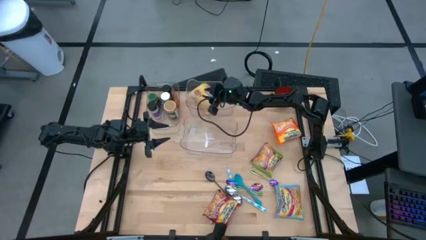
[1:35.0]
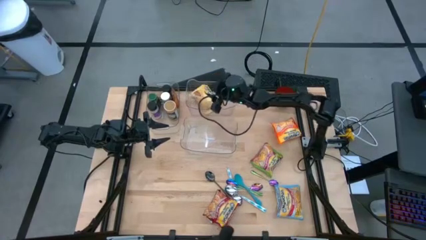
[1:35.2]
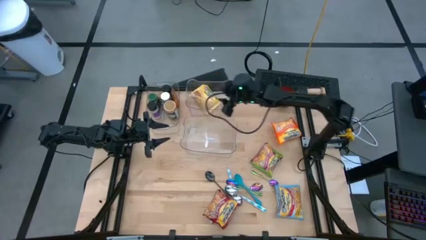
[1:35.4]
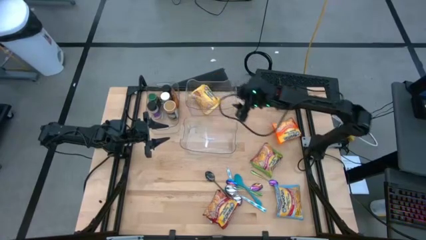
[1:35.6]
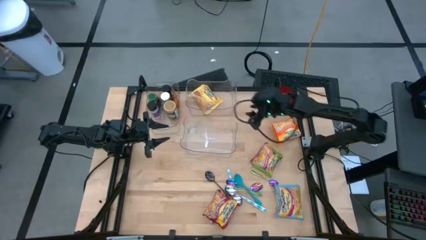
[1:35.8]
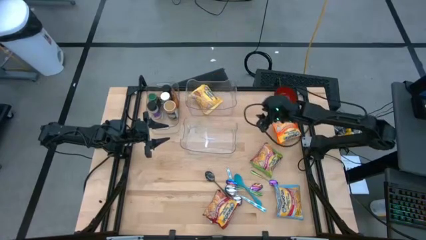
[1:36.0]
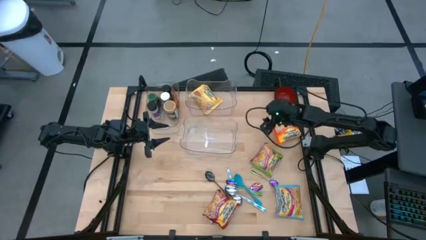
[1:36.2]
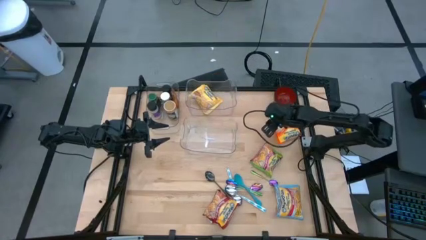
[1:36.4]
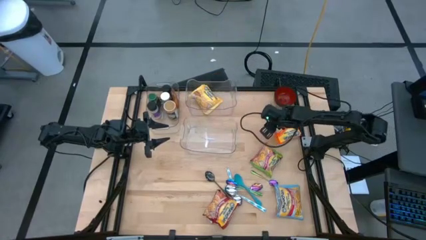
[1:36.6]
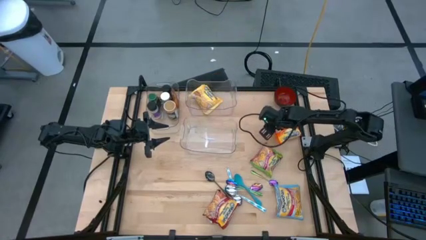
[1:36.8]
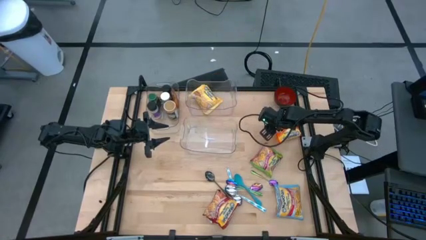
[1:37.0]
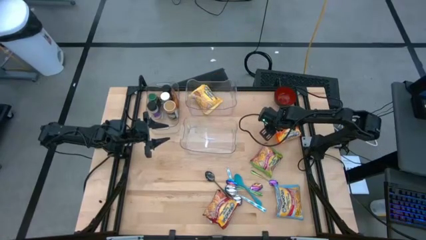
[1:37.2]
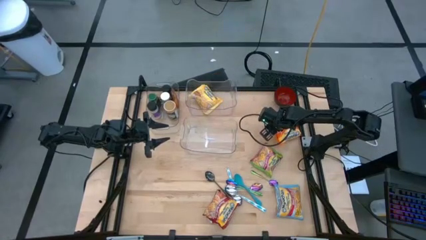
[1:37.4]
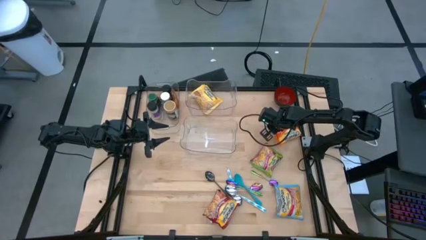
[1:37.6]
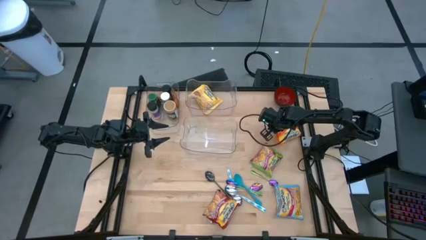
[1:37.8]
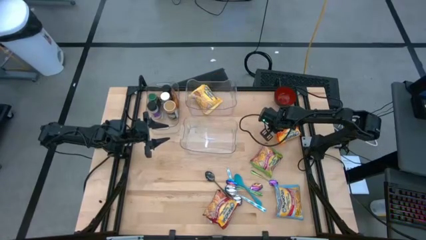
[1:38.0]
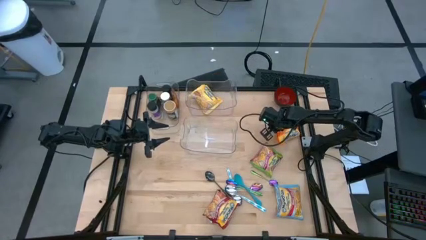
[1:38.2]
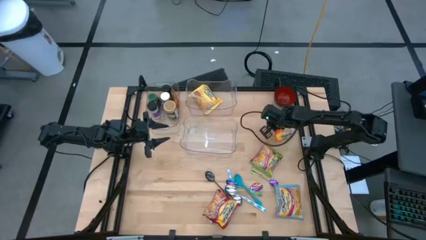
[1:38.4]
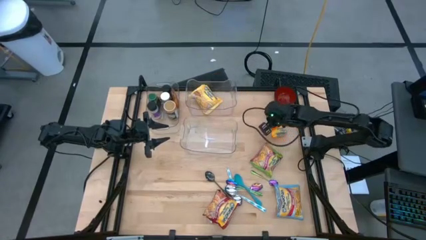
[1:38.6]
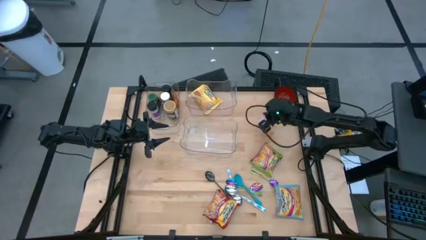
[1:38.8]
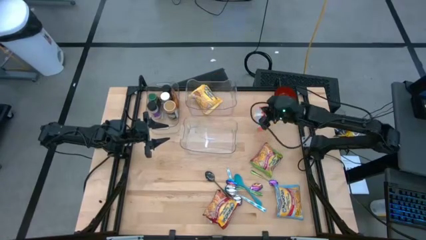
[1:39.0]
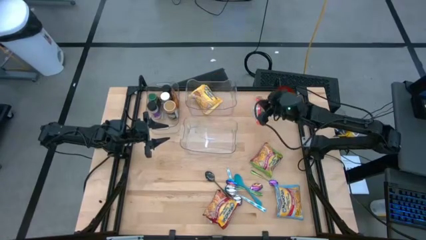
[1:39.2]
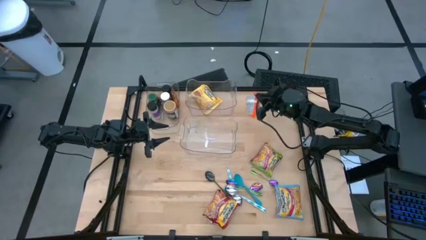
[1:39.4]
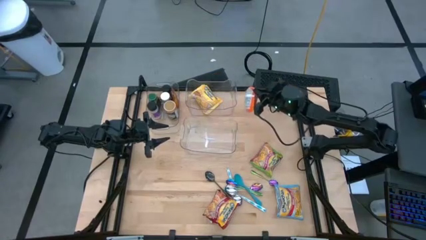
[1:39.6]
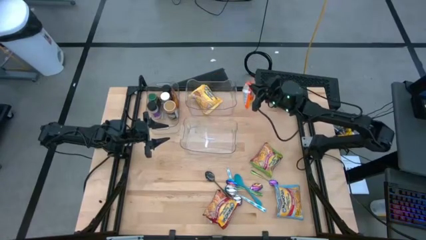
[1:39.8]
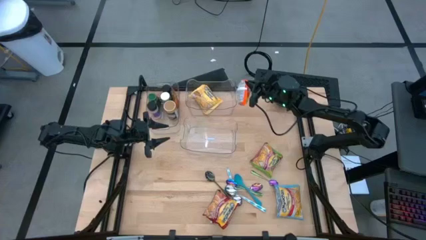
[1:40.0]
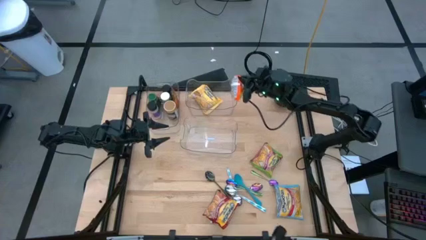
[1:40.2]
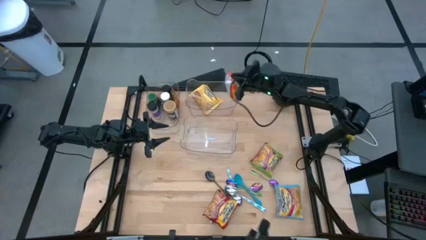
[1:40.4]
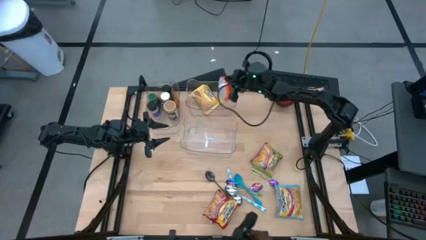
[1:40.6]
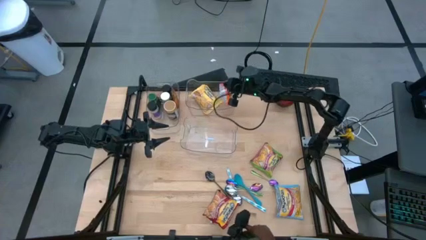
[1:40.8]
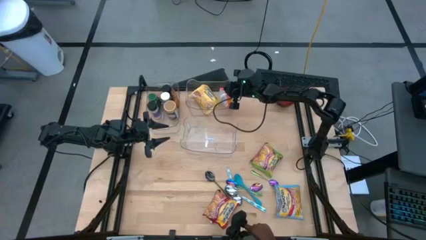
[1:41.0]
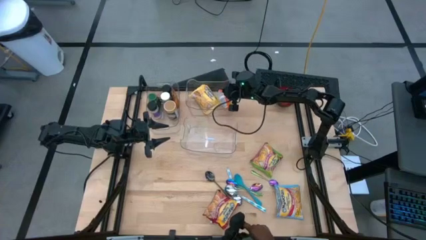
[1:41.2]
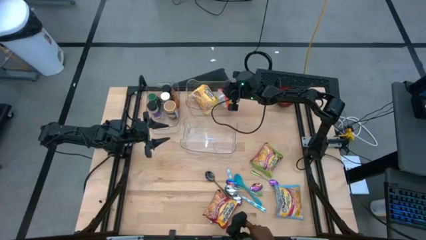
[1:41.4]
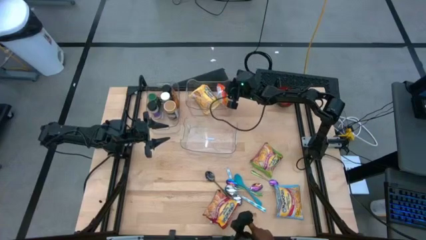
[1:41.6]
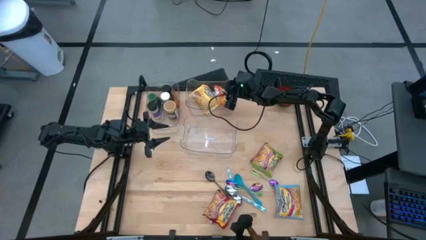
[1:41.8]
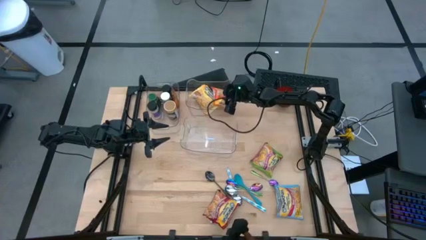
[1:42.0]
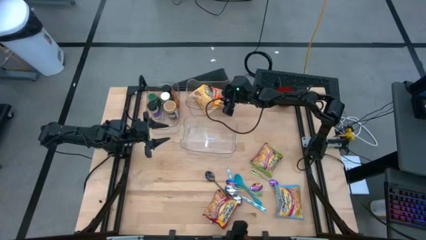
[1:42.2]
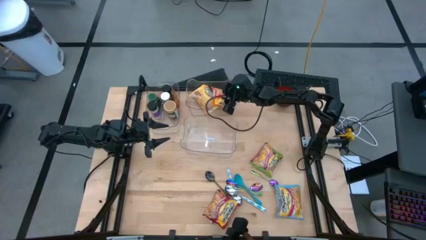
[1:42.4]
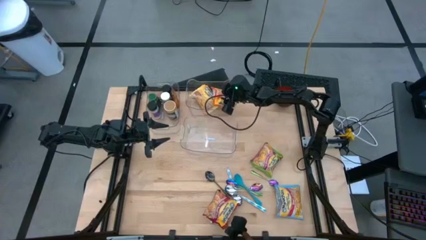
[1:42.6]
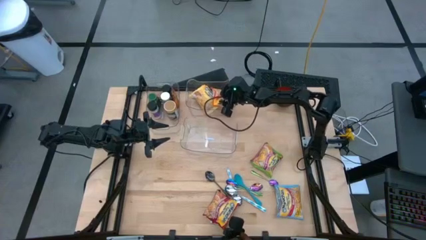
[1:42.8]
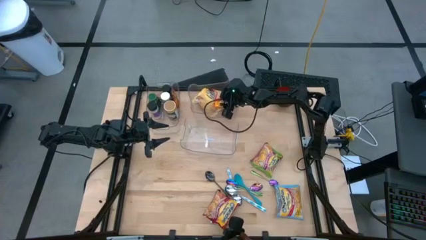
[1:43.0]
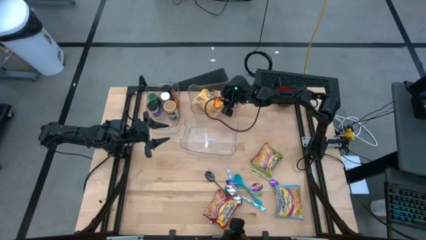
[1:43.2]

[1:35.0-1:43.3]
Task: Pick & Place Food Item
Put the orange noodle pack into the top right transparent bin

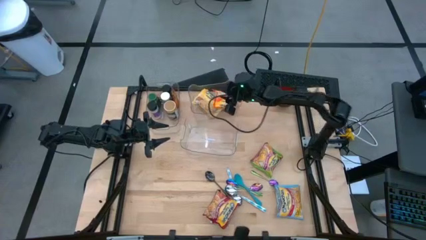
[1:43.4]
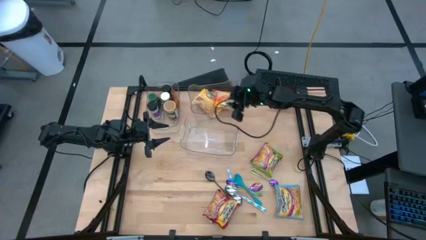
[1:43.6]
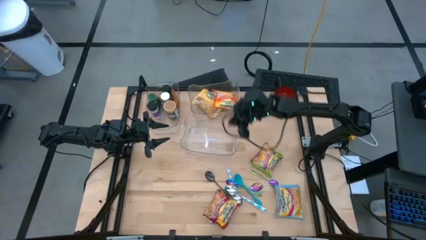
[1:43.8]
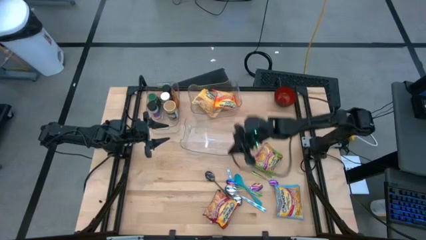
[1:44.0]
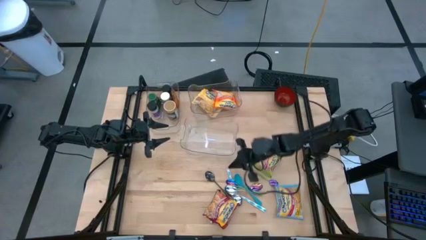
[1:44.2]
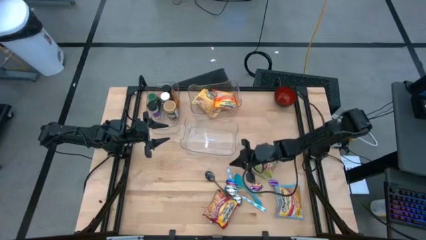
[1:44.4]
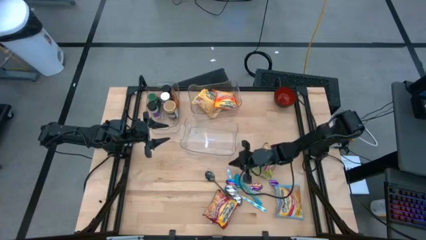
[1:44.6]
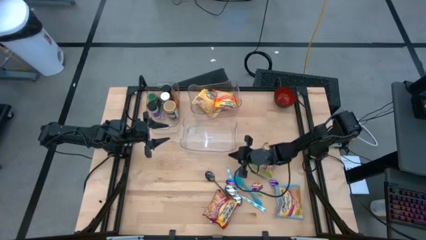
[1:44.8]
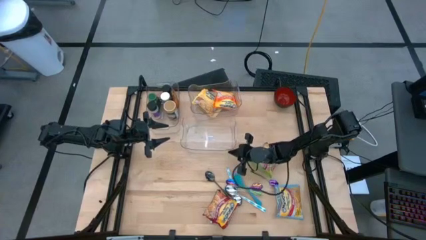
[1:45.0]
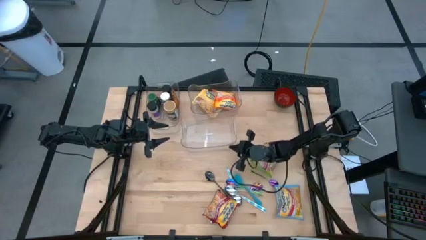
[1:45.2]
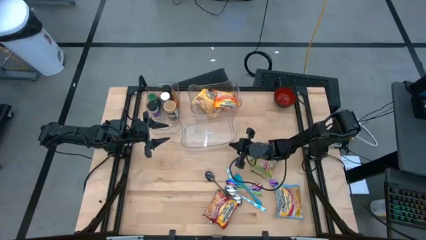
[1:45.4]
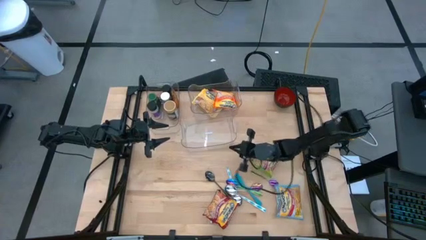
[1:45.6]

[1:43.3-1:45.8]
Adjust the bottom right transparent bin

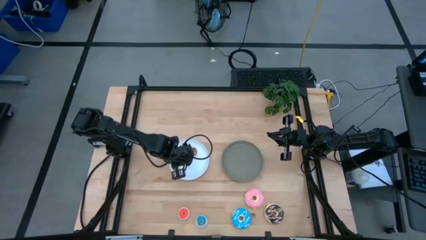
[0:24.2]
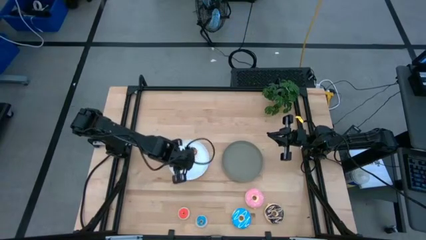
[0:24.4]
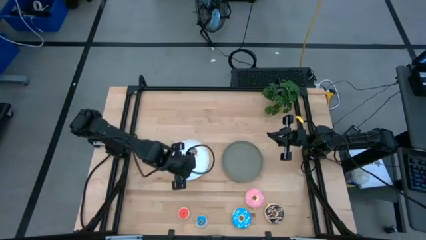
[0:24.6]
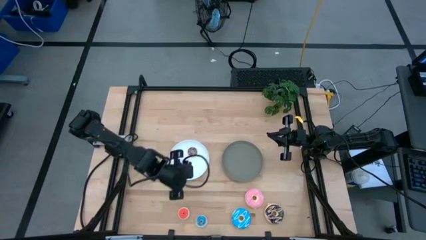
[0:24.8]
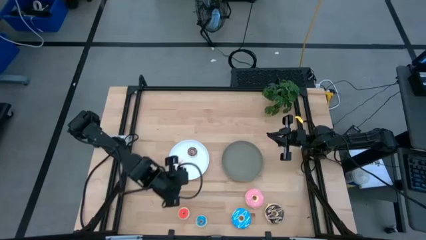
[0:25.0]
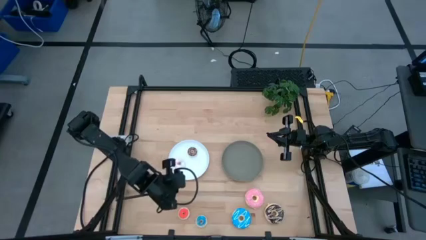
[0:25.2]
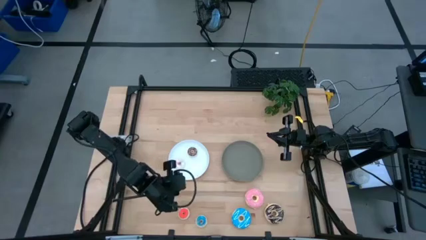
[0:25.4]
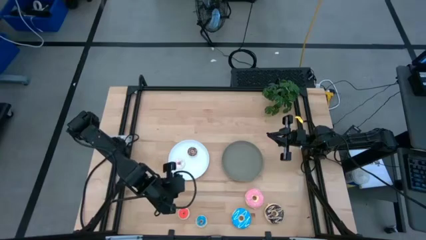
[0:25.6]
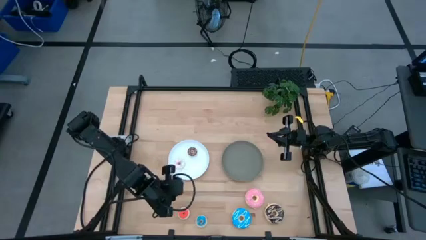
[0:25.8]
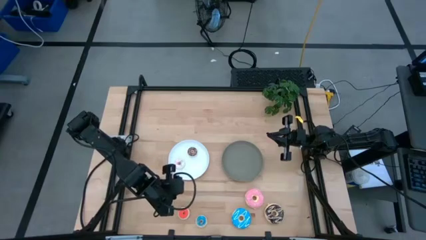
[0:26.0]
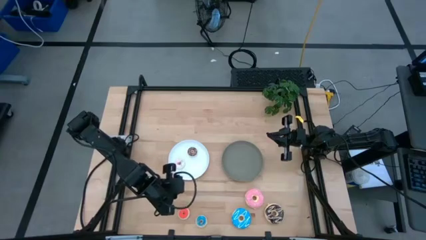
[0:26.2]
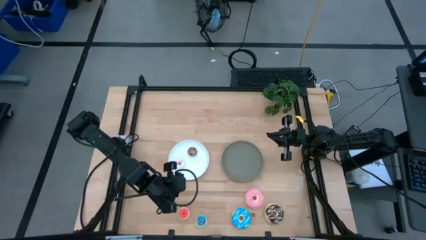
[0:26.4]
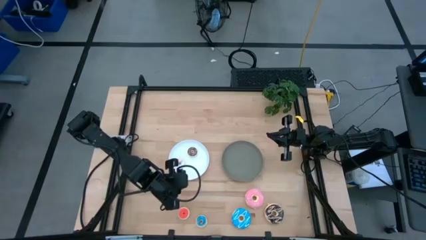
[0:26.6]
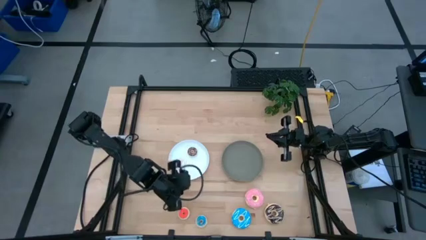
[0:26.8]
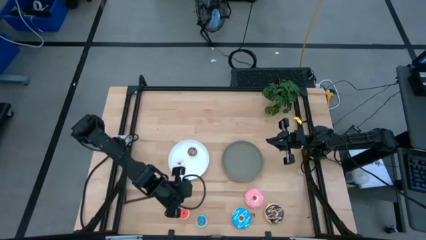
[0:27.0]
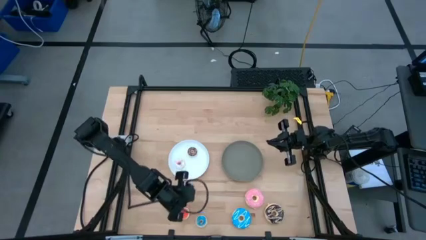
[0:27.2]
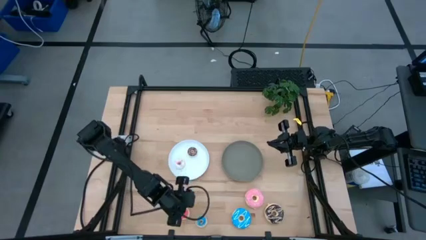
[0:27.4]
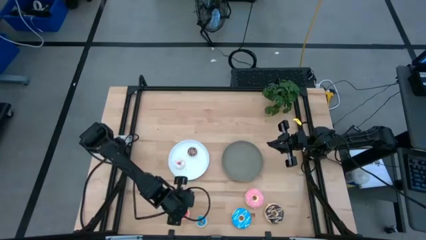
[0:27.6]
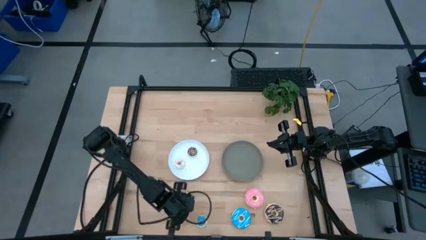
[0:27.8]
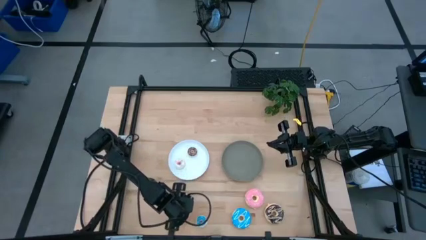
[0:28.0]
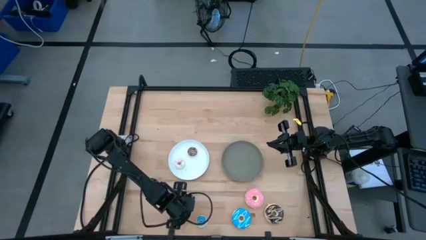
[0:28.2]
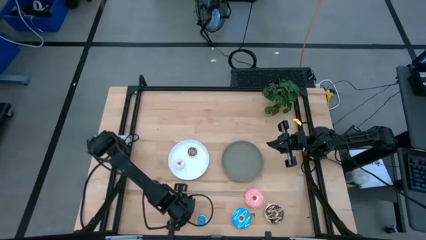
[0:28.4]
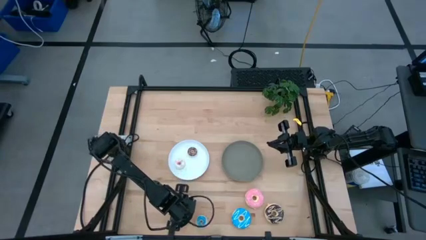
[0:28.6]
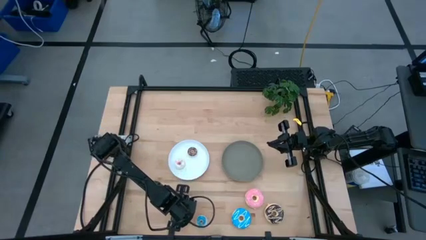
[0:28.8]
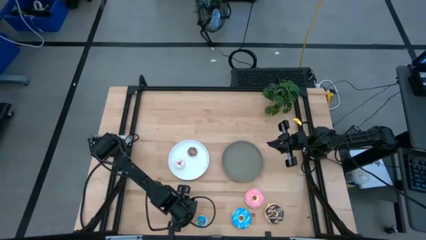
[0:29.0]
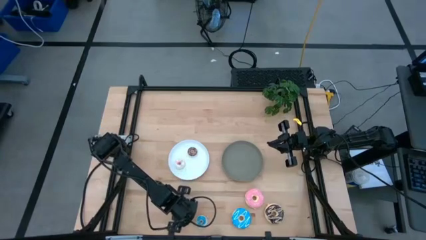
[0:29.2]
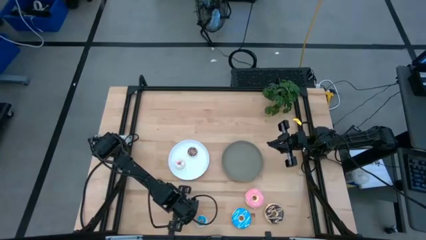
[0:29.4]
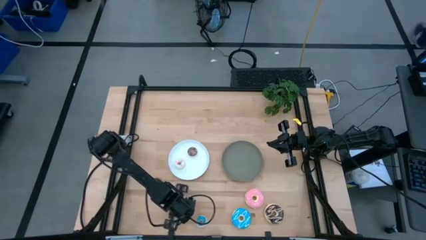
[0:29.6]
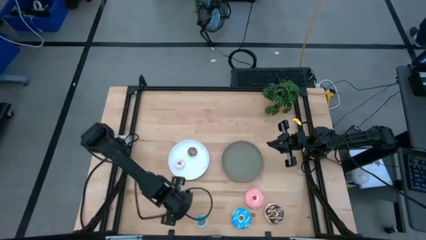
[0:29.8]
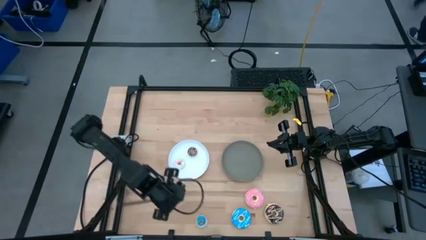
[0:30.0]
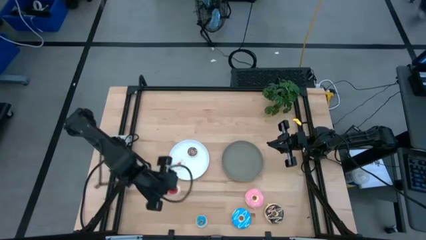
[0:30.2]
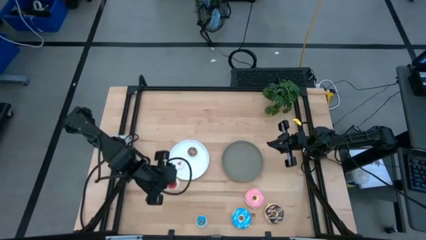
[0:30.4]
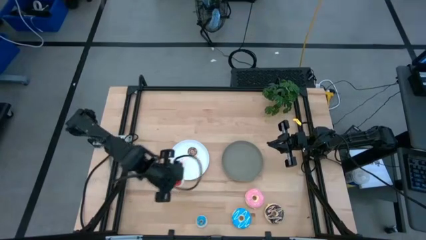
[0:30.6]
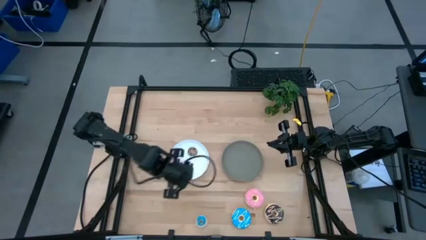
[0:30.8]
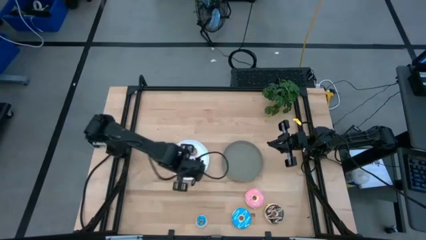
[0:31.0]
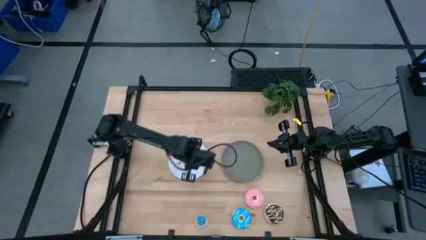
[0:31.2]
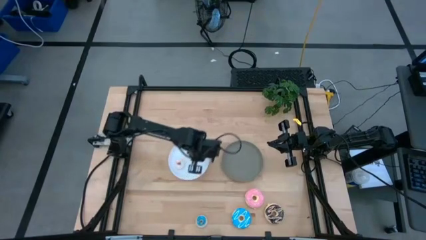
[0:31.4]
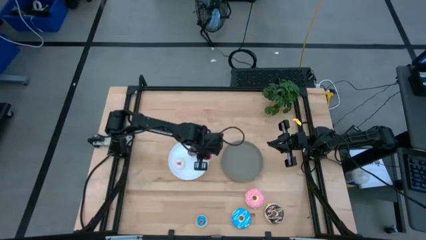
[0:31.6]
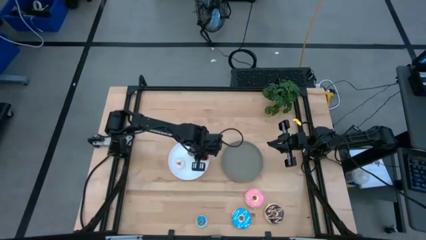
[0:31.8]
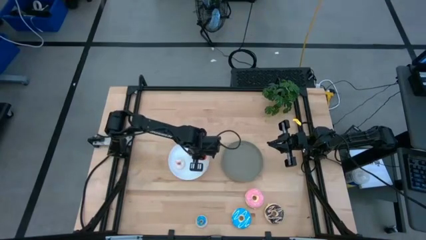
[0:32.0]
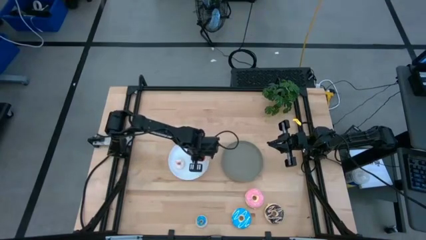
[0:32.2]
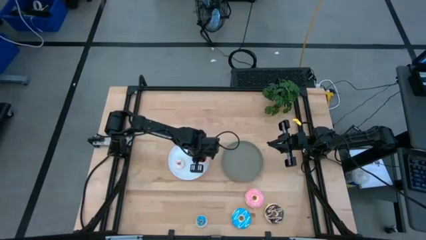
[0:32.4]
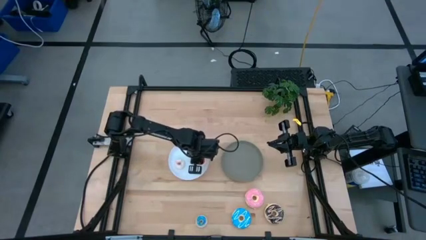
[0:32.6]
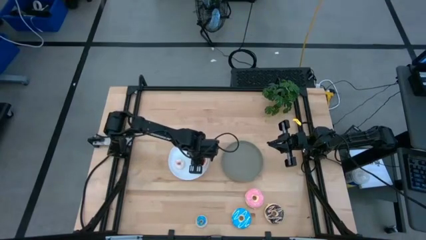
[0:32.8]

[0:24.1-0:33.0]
Task: Pick & Place donuts
Put the small orange doughnut on the white plate
